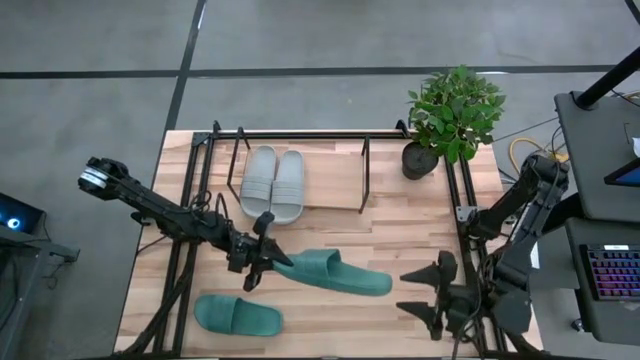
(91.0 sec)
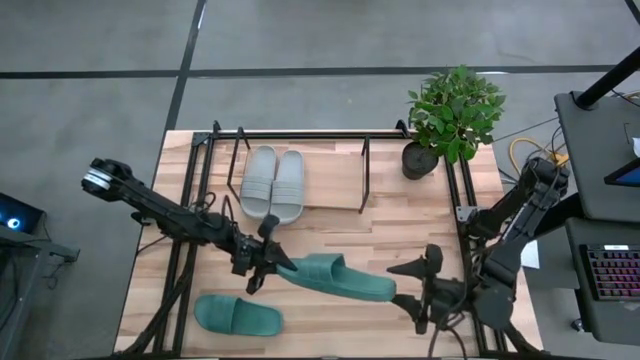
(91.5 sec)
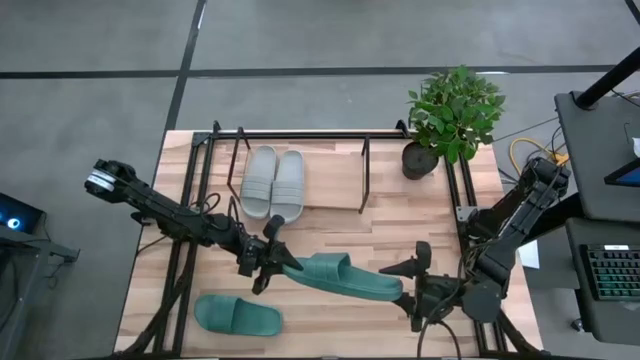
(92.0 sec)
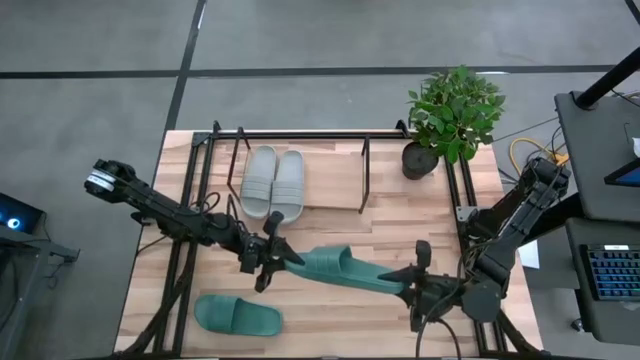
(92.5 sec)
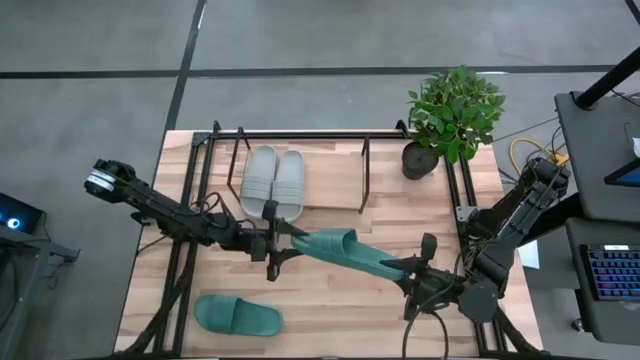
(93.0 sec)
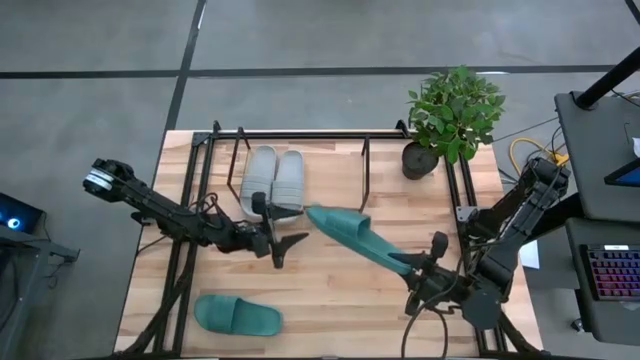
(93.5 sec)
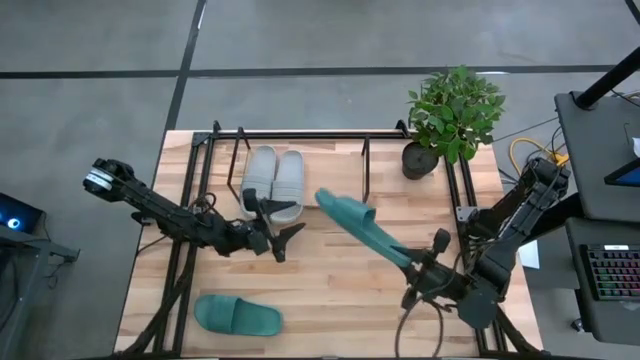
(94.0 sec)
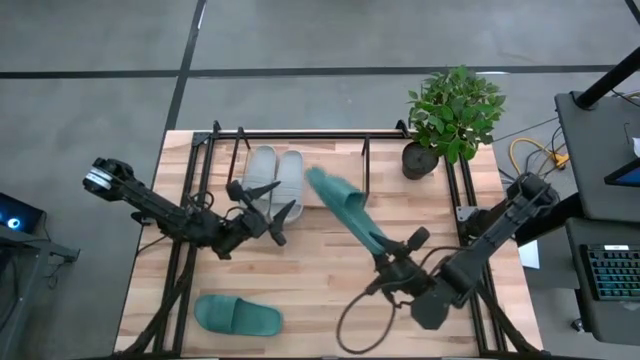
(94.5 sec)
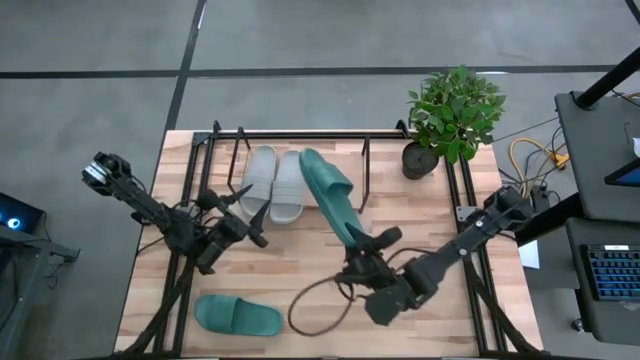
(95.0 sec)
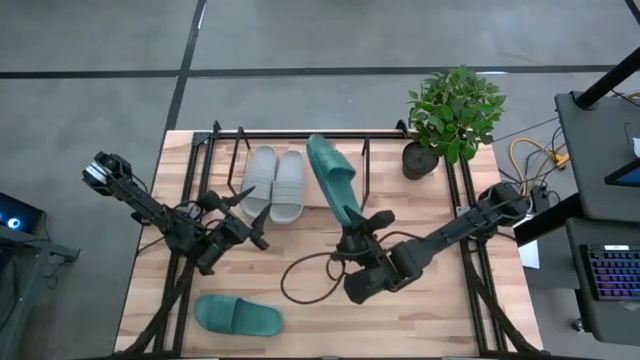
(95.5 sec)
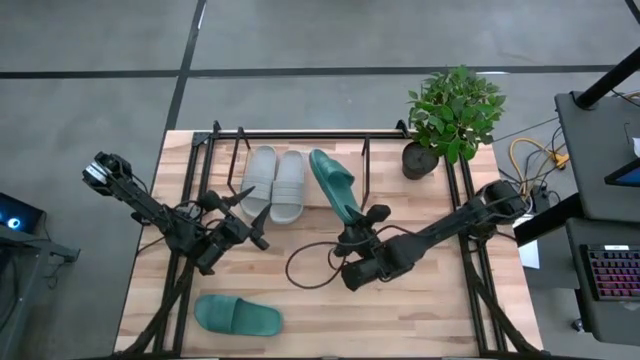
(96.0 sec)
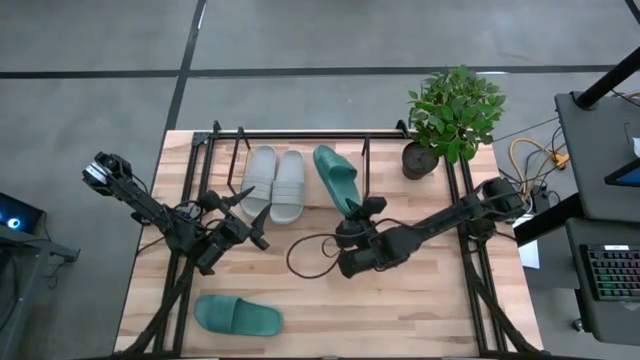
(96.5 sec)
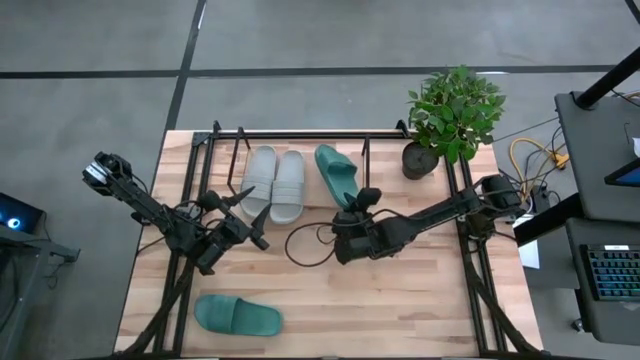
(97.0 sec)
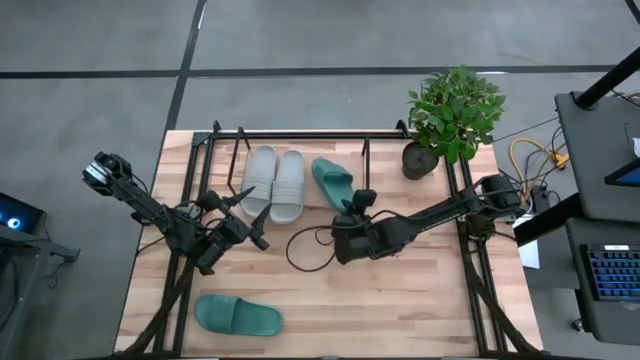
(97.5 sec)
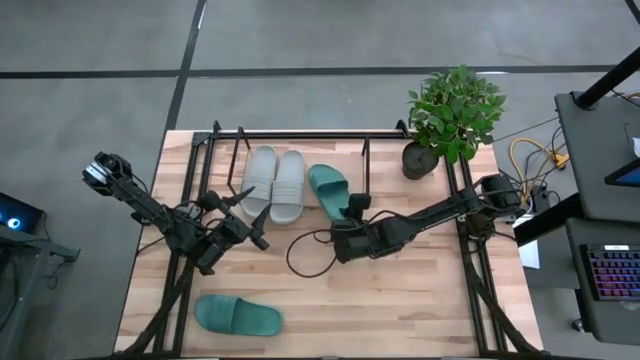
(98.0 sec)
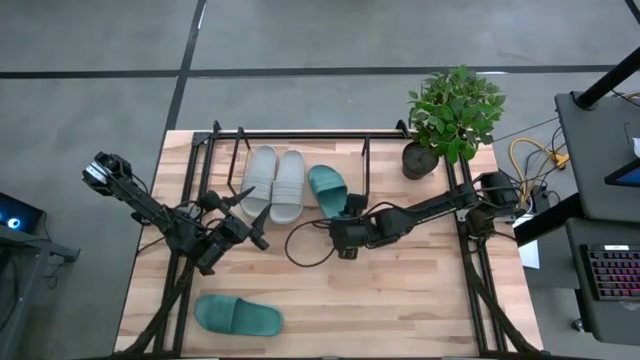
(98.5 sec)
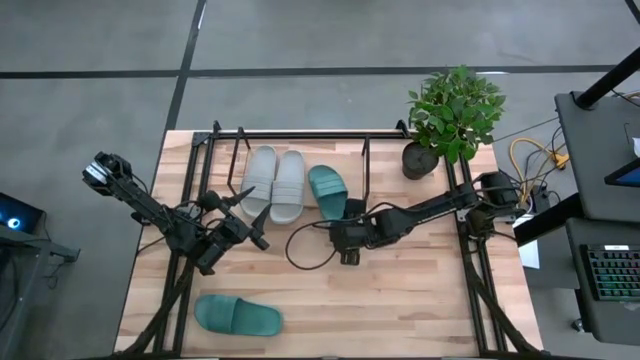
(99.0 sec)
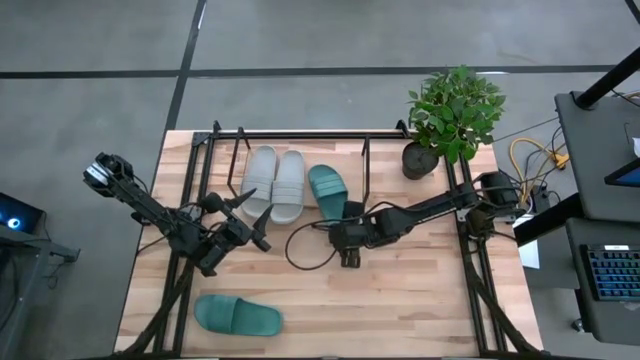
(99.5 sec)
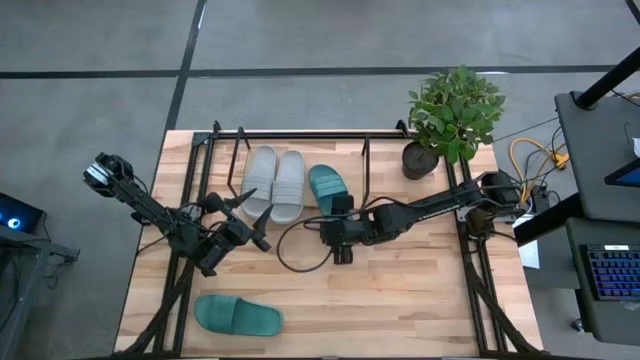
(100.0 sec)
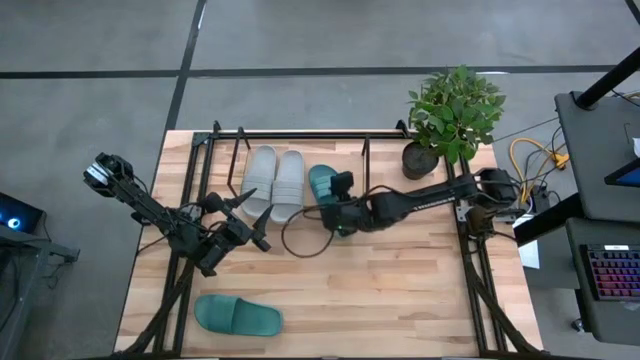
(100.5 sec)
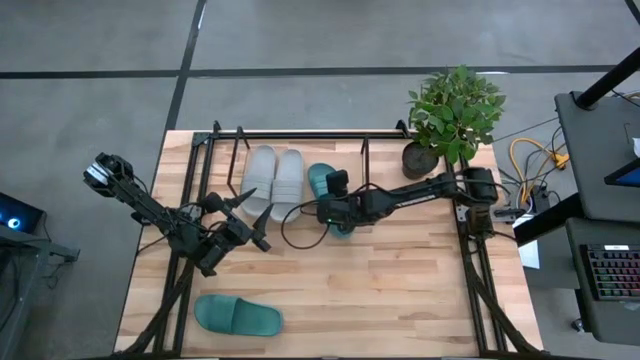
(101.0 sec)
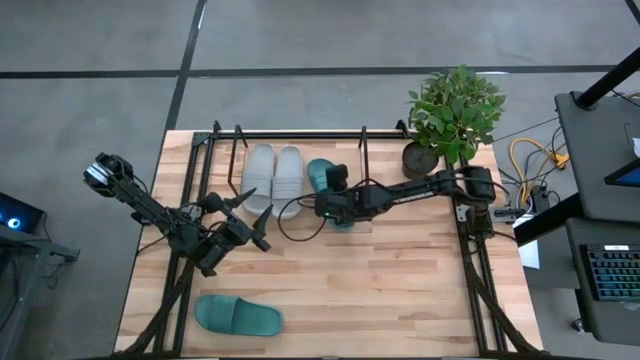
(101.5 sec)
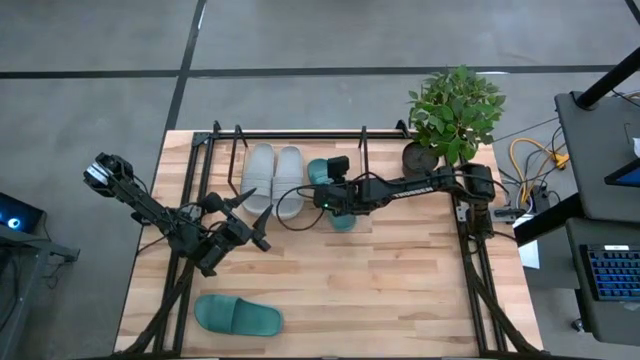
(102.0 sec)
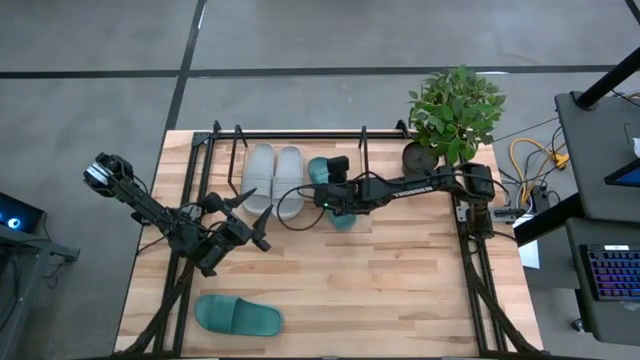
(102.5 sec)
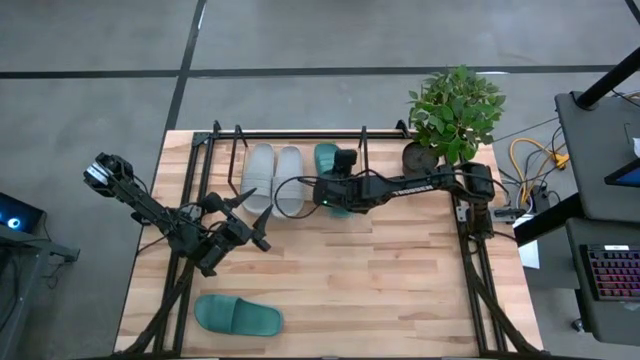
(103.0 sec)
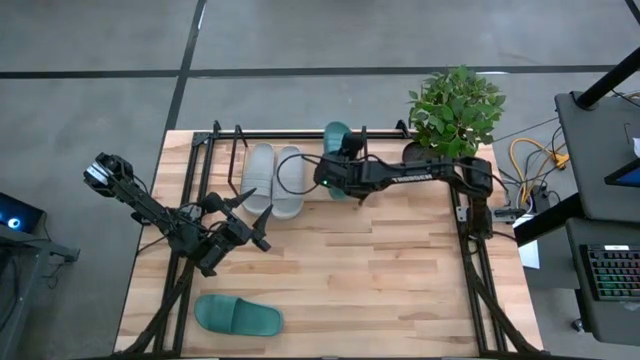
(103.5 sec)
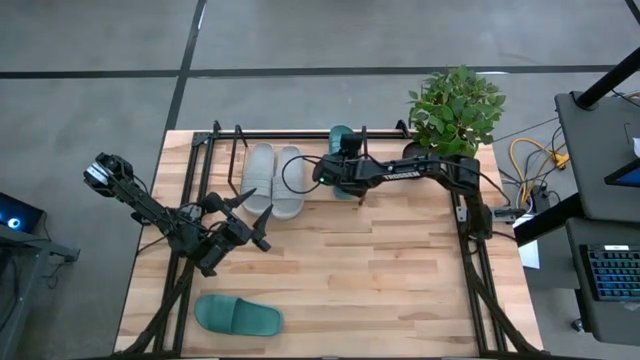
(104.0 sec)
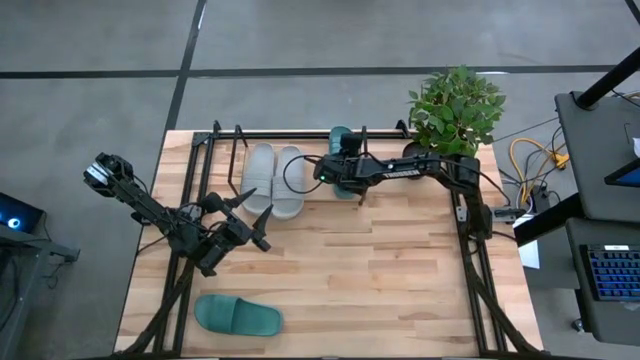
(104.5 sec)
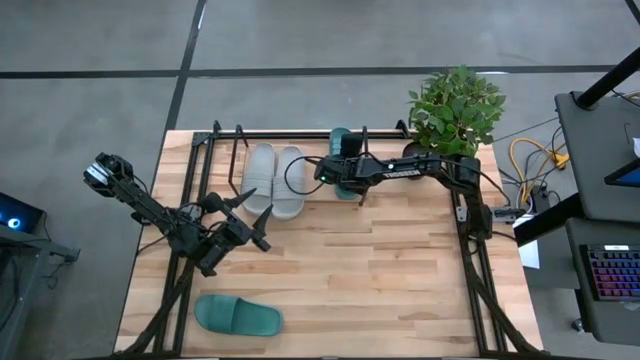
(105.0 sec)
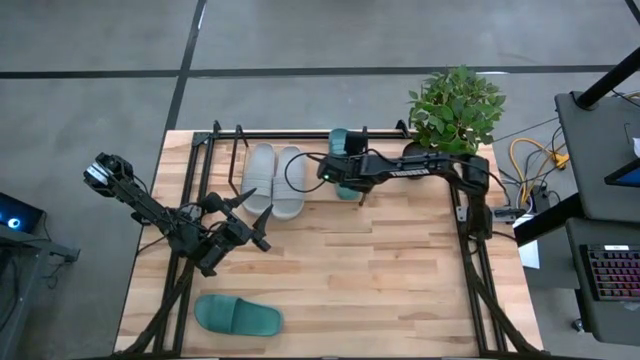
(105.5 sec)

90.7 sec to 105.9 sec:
Task: Pick and place slides into the shelf
Put the right green slide on the shelf

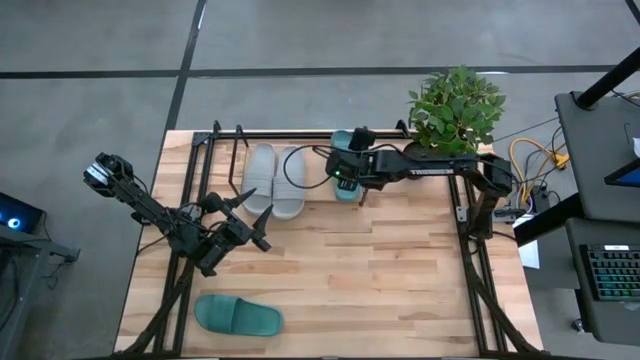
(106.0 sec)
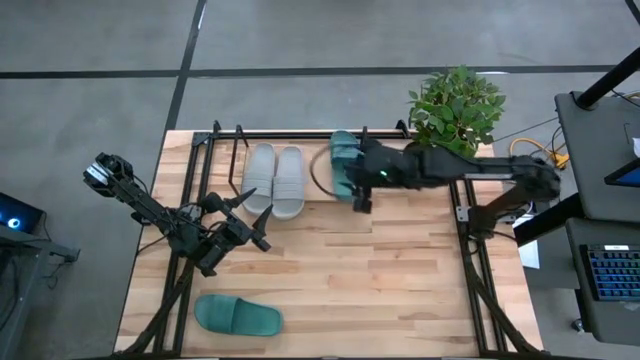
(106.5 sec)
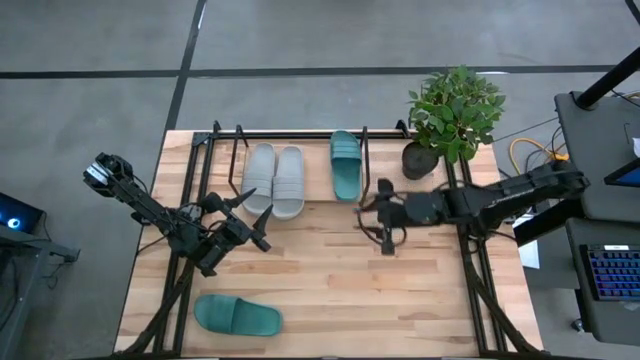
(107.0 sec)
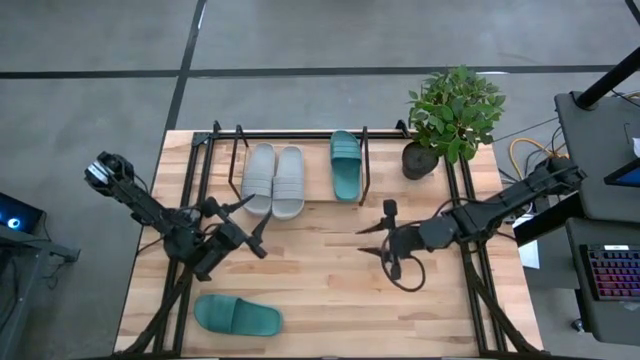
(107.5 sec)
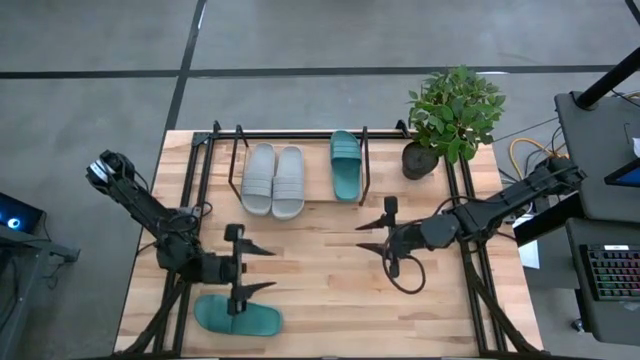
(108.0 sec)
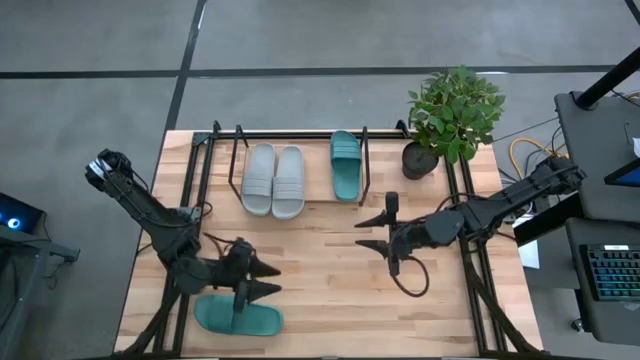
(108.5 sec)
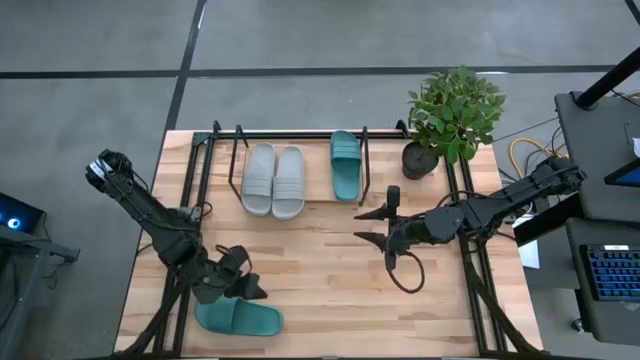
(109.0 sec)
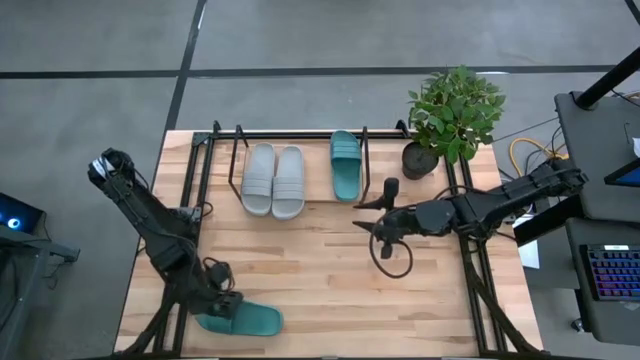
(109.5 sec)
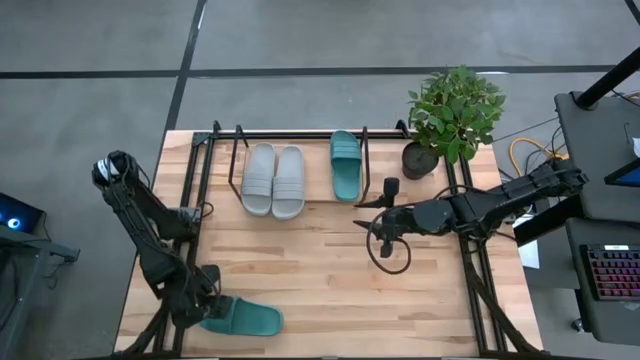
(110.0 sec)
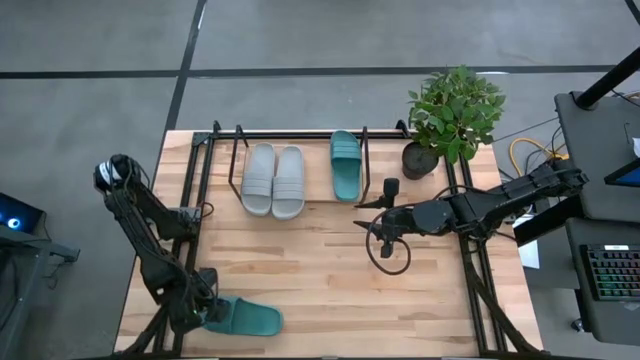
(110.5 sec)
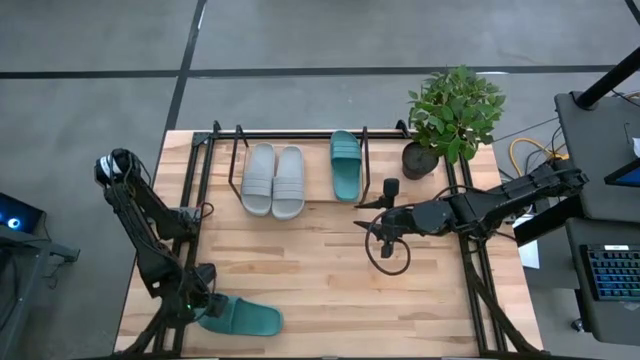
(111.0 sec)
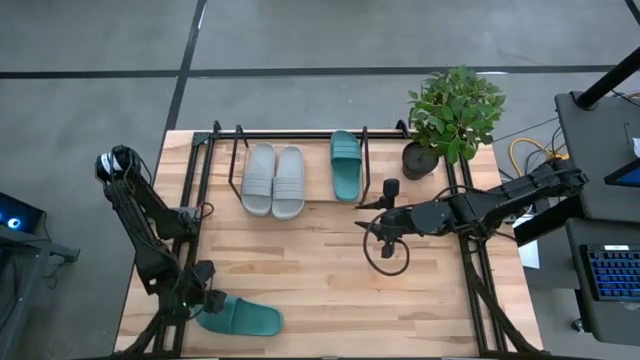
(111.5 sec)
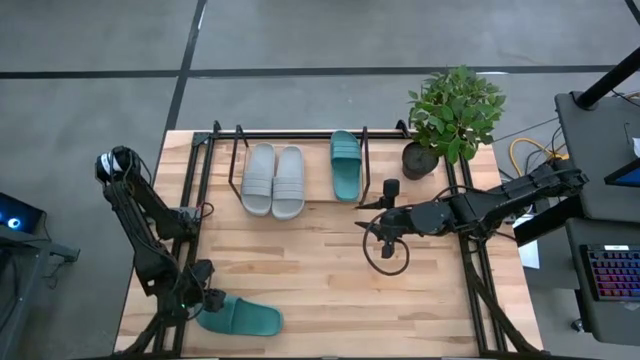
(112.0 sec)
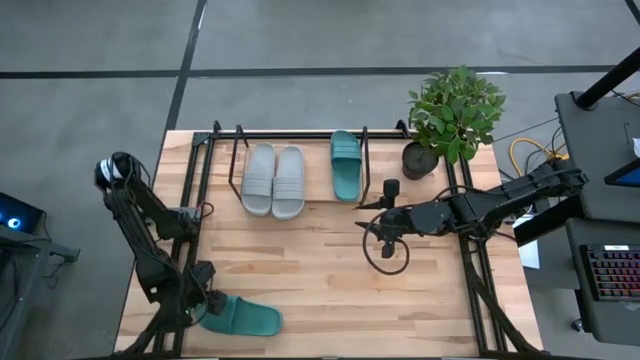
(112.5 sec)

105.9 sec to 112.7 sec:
Put the left green slide on the shelf
